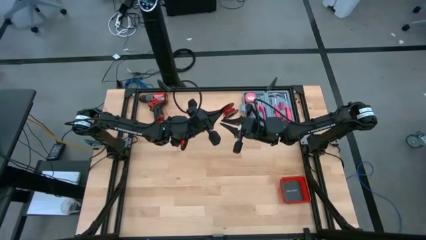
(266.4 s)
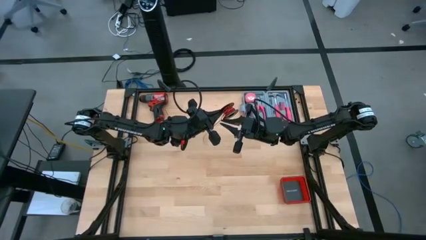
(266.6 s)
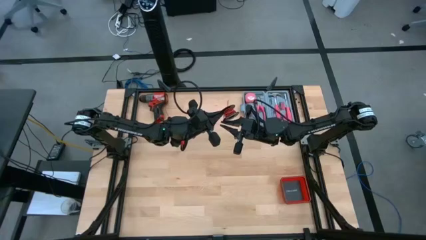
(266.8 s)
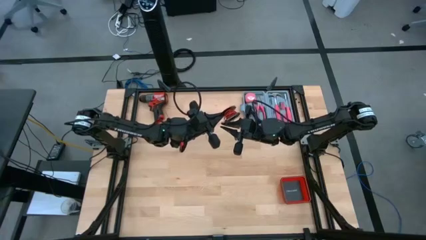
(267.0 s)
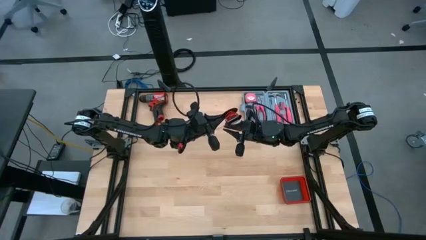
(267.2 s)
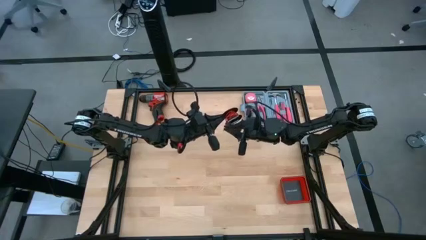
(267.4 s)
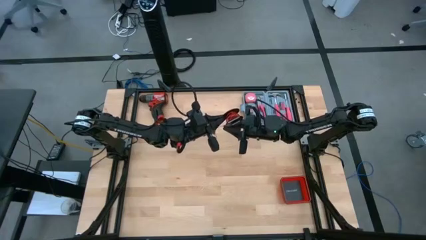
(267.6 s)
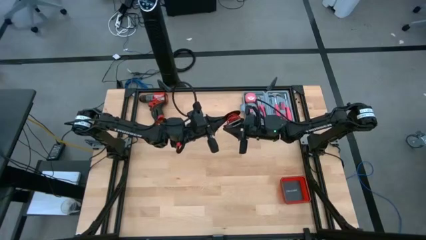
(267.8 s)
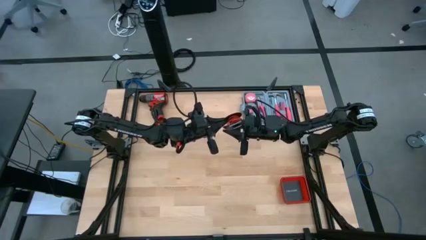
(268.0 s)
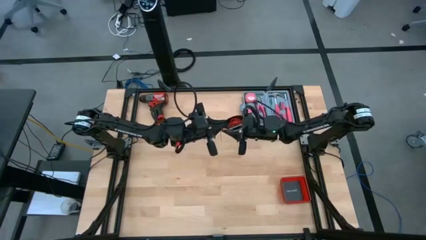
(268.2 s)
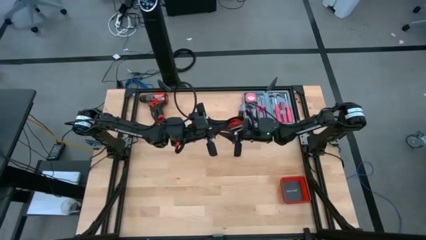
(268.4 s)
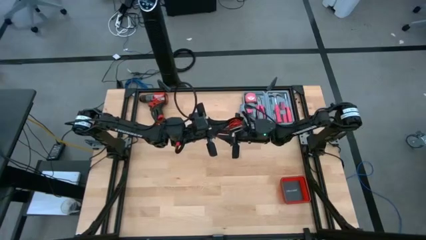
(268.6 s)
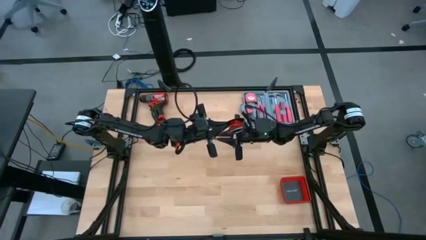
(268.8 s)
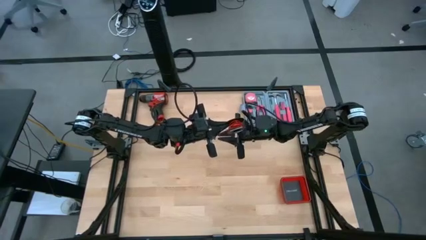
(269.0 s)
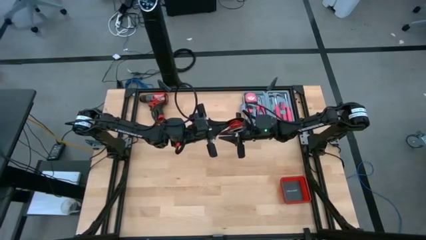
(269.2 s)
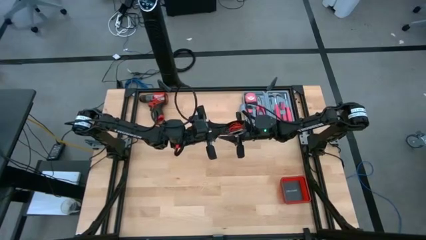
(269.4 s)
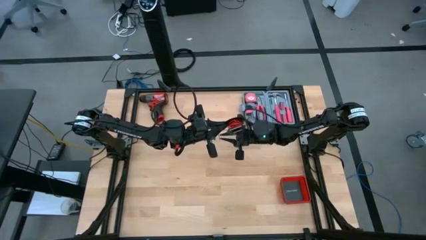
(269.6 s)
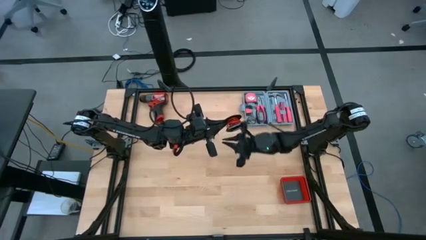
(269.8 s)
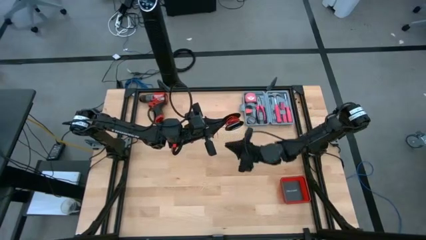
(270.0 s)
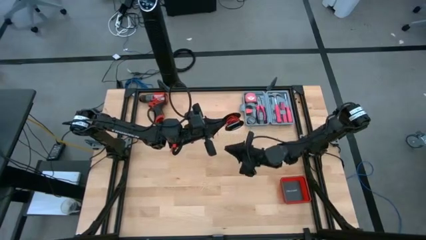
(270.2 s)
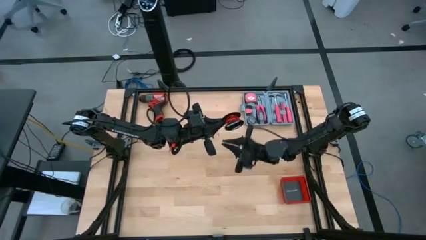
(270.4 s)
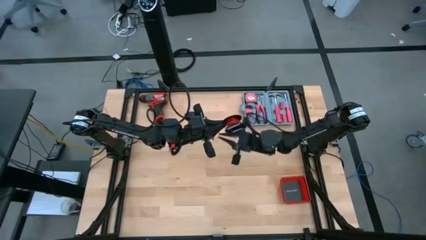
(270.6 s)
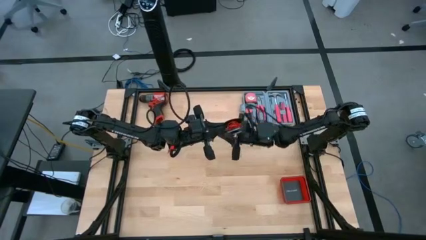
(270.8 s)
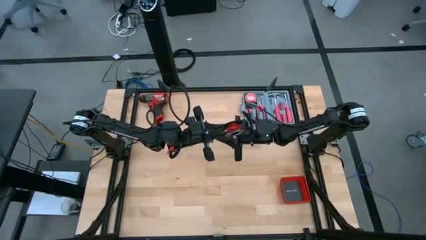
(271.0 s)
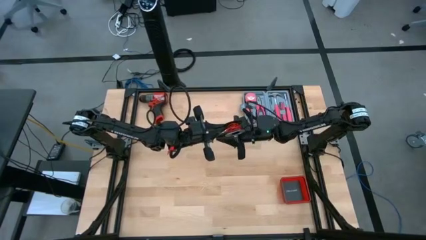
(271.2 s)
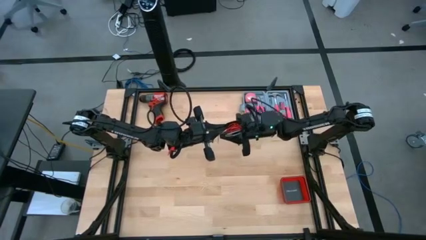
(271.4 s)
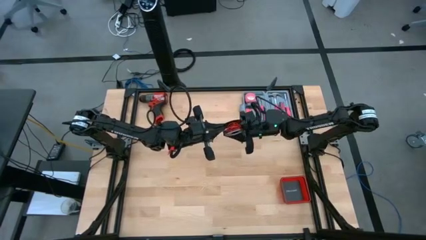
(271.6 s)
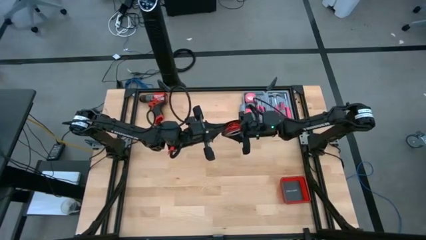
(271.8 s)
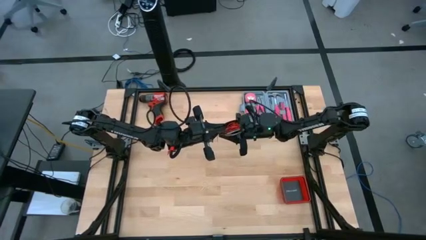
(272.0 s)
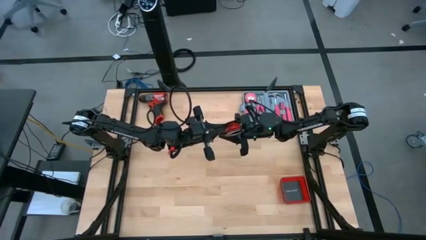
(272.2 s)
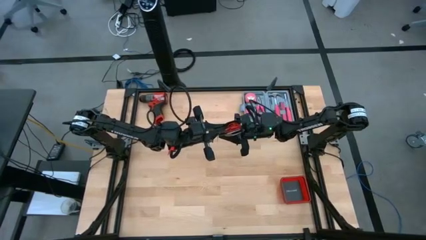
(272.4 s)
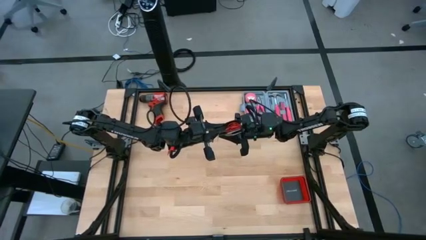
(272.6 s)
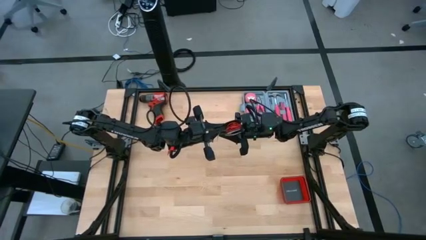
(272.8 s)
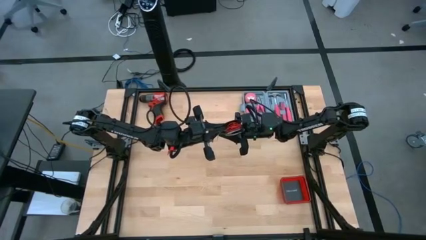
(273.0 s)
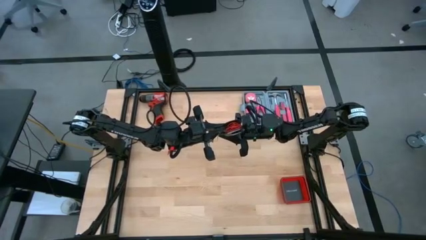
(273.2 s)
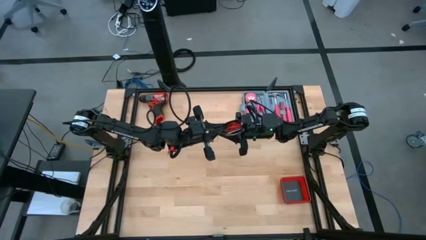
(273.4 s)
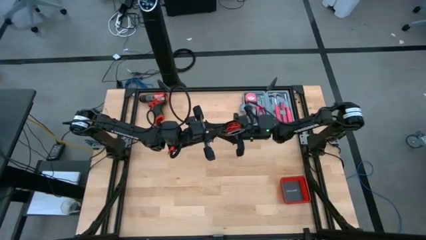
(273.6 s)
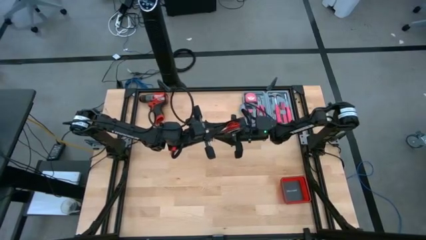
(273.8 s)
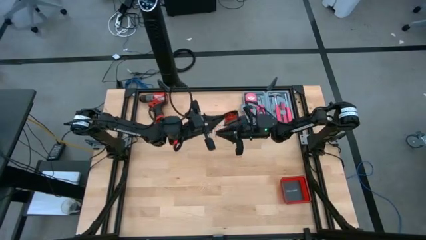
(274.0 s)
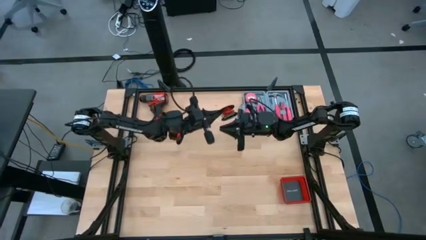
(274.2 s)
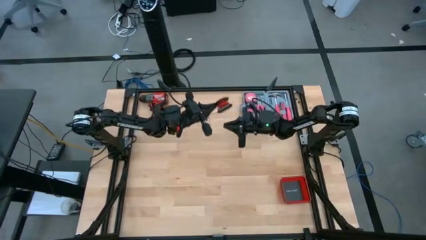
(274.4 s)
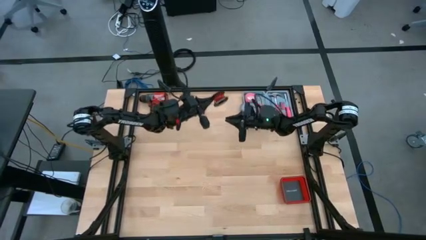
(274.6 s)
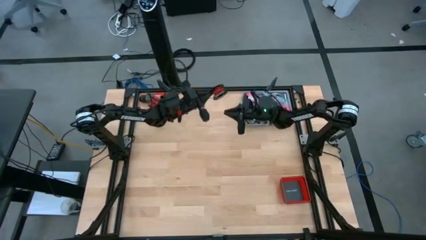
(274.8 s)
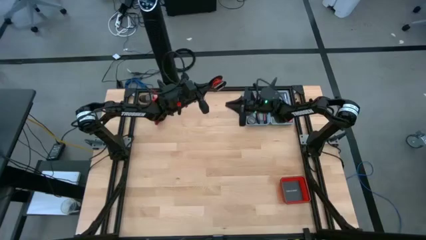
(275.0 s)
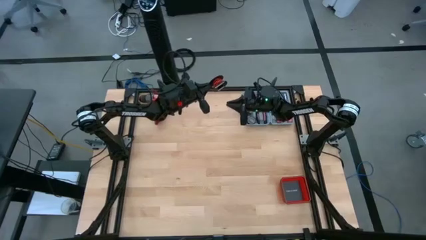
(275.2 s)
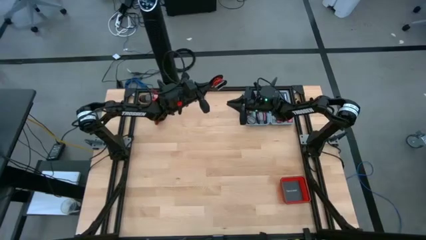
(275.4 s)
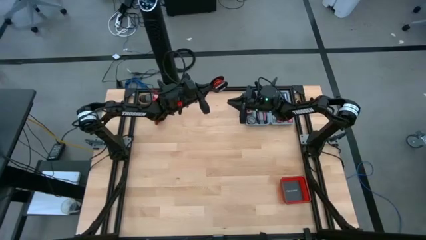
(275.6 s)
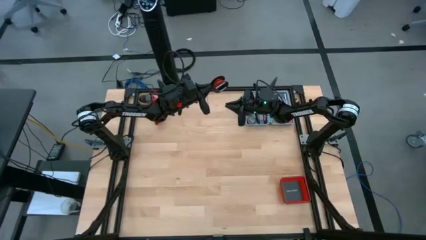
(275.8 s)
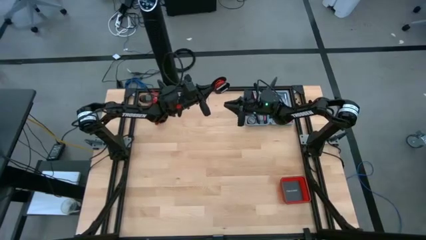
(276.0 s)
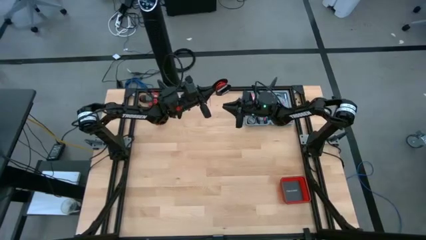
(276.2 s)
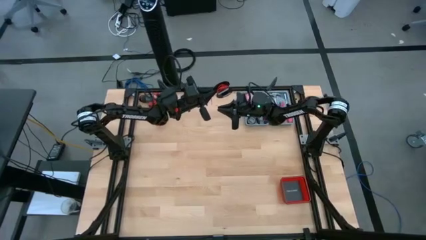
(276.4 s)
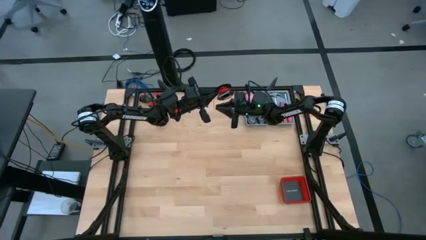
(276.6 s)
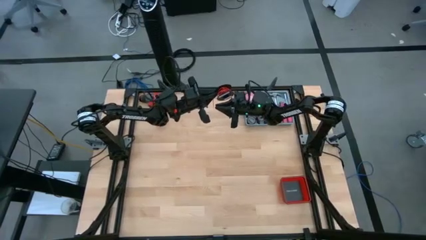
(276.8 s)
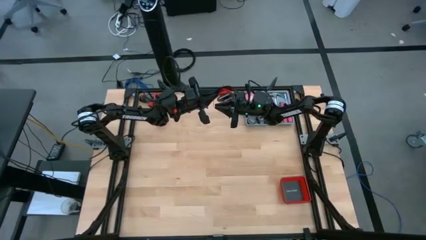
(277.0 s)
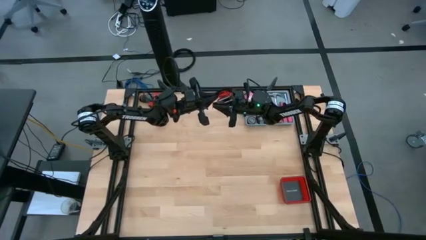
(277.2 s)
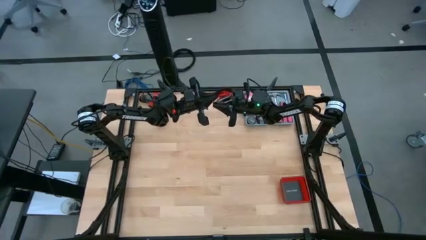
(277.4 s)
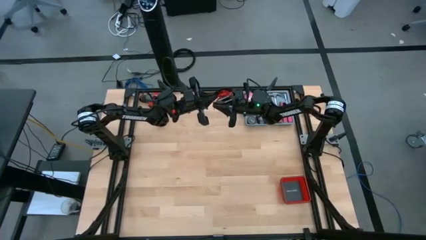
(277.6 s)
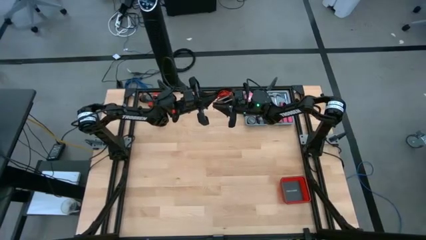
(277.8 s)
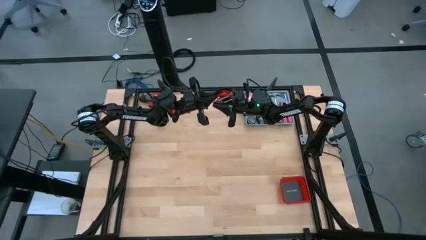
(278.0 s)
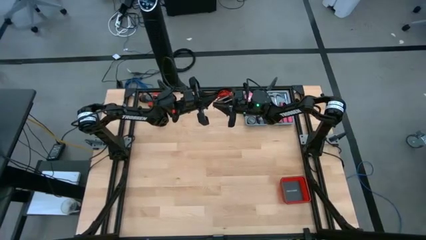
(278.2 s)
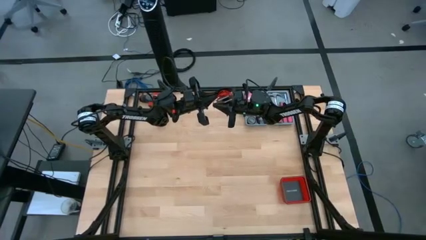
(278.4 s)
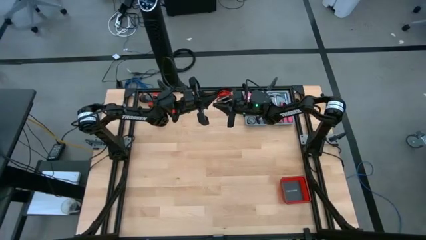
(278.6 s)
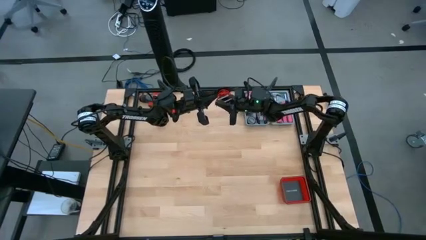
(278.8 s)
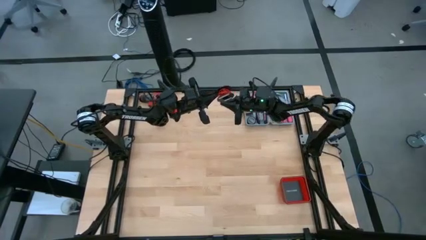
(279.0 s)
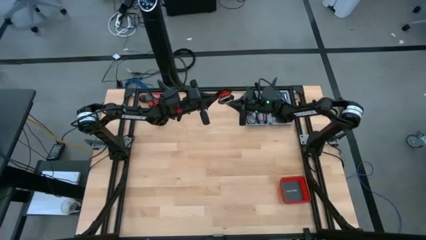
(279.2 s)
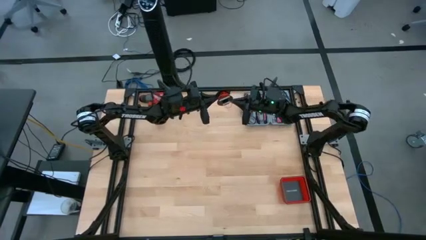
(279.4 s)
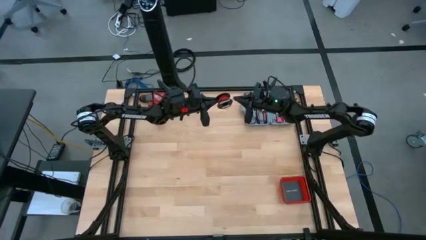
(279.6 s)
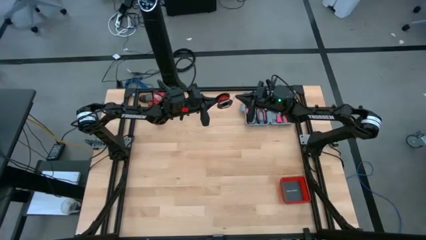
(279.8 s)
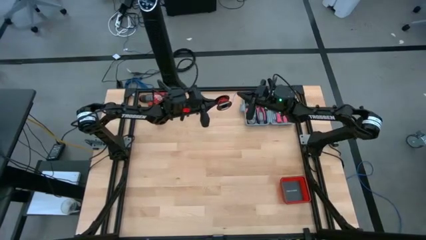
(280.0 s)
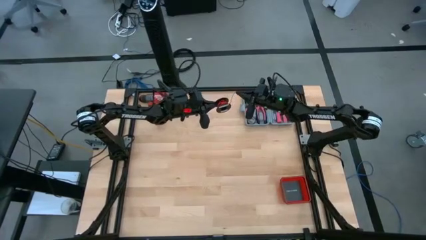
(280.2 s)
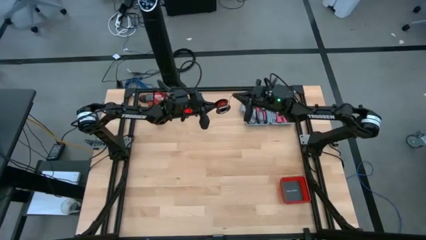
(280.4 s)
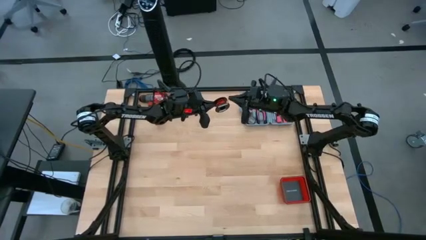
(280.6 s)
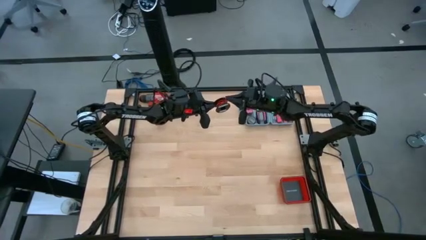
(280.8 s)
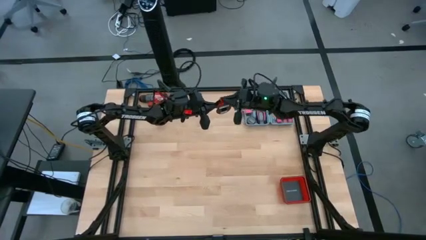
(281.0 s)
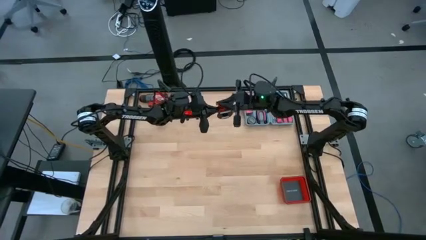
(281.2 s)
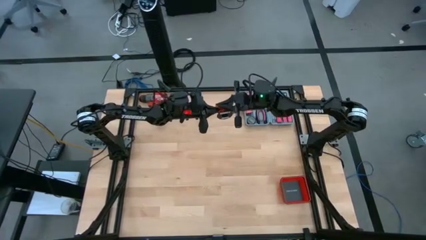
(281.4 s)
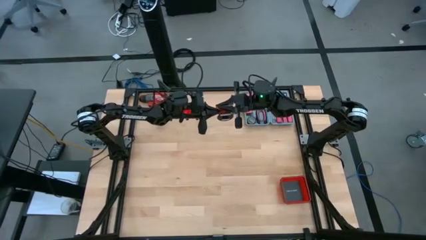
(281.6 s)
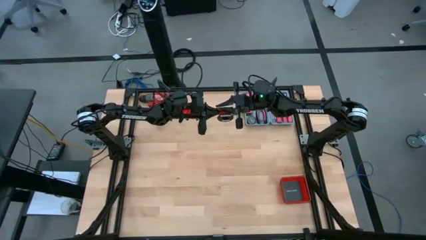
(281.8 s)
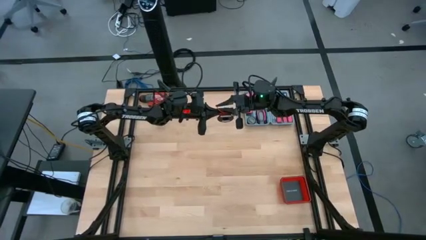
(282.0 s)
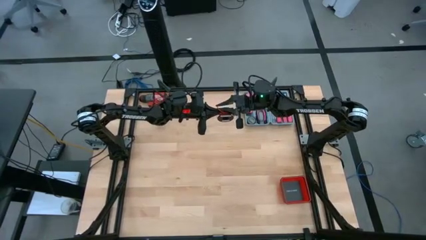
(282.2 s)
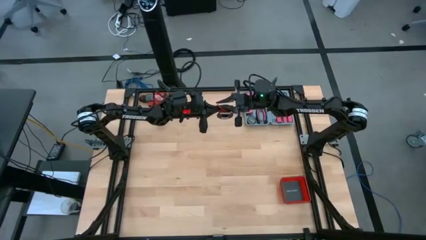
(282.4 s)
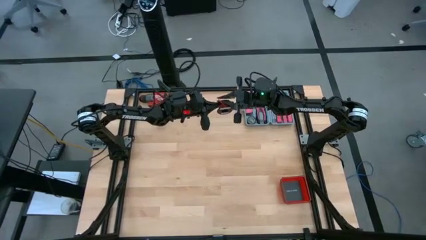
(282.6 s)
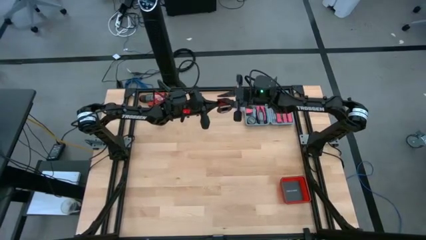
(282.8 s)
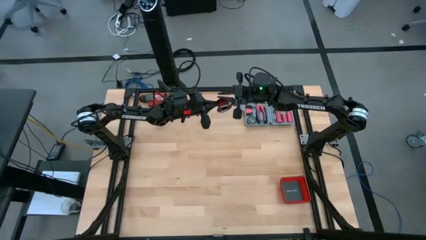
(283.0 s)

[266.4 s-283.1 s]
Task: Coil cords
Coil the red wire on the black spool
